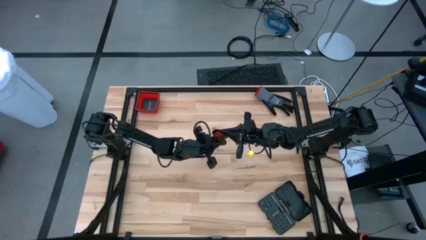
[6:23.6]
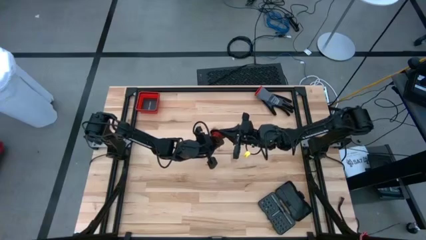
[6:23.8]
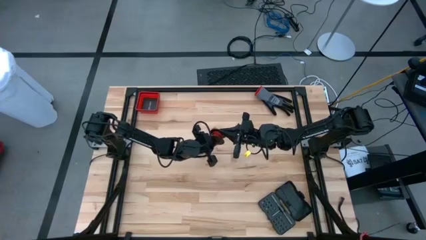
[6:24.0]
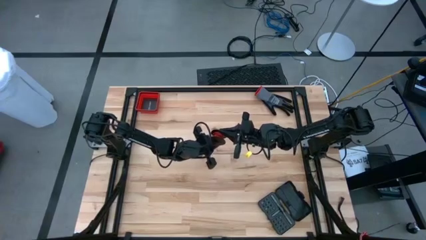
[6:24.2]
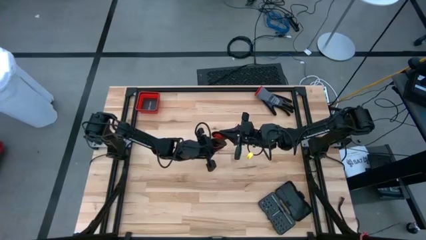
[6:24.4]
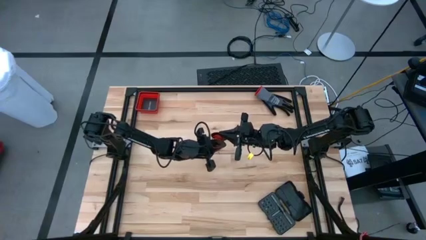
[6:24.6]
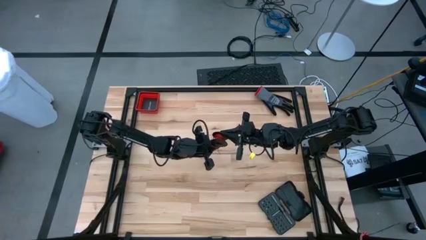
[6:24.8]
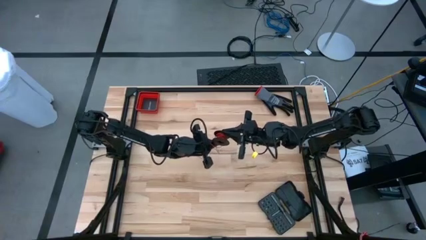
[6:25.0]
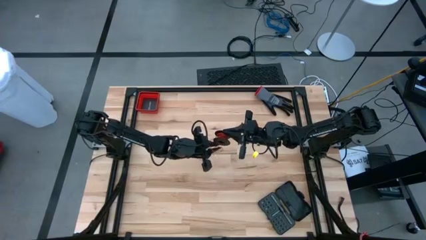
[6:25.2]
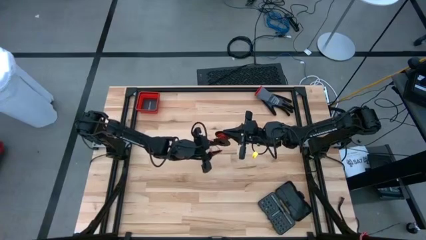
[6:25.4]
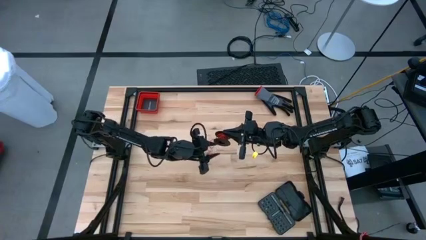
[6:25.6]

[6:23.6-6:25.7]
Task: Coil cords
Coil the red wire onto the spool

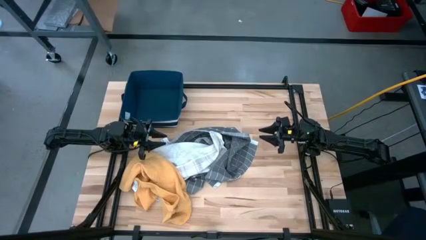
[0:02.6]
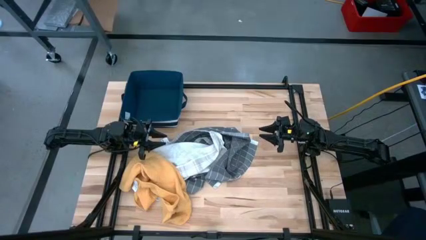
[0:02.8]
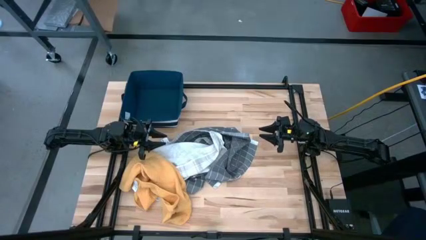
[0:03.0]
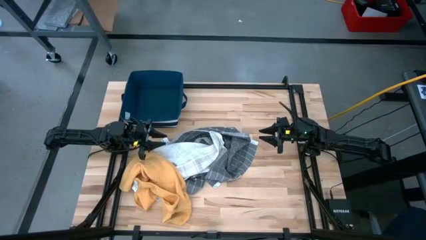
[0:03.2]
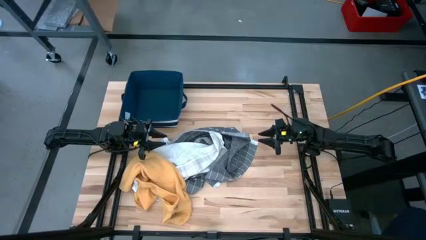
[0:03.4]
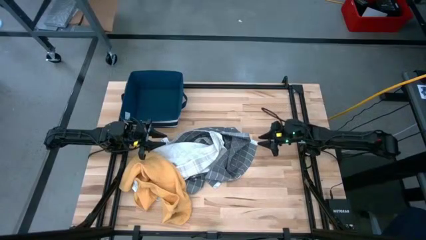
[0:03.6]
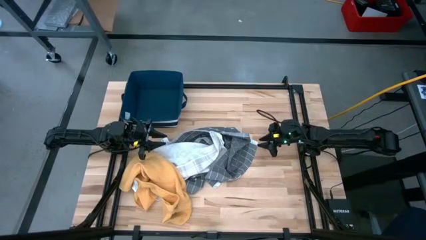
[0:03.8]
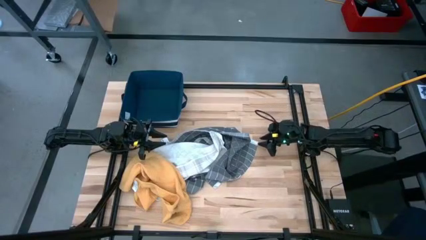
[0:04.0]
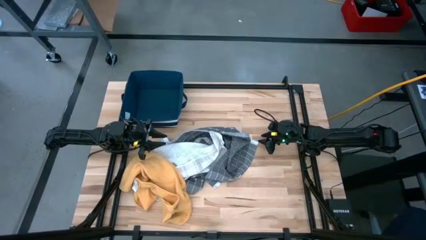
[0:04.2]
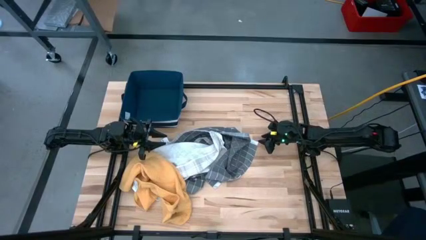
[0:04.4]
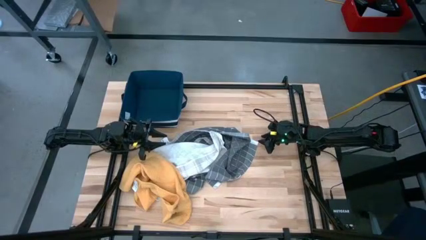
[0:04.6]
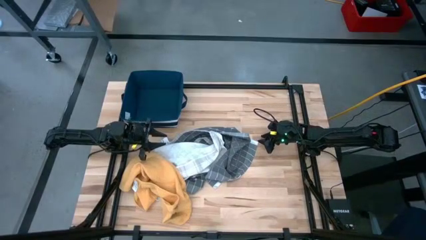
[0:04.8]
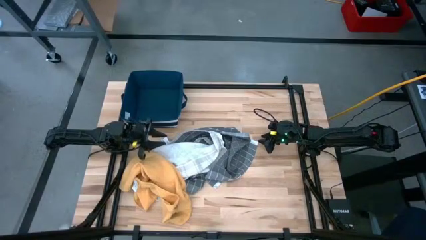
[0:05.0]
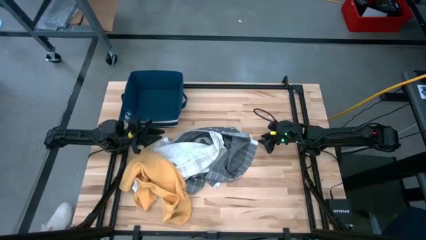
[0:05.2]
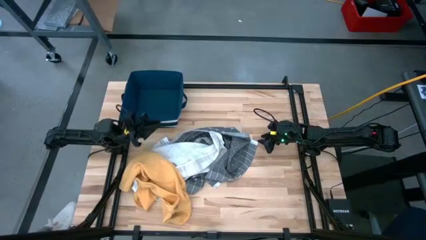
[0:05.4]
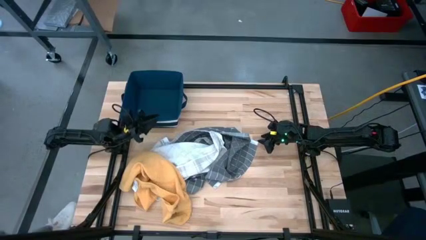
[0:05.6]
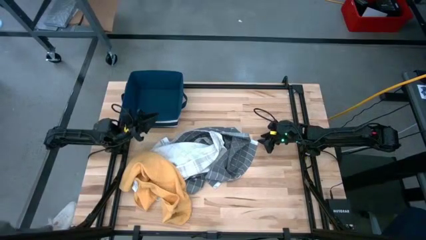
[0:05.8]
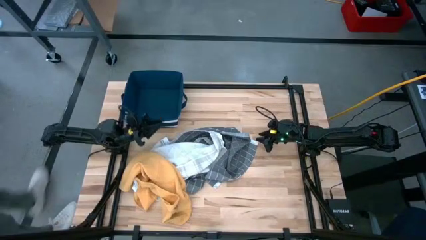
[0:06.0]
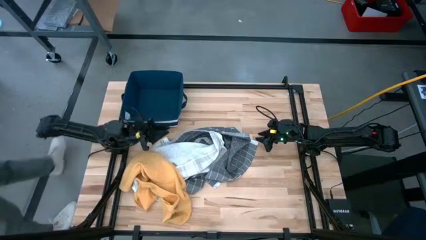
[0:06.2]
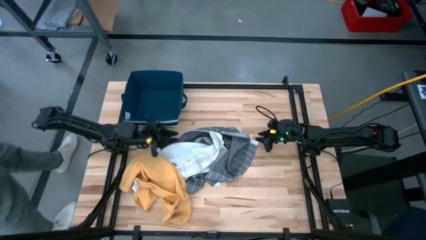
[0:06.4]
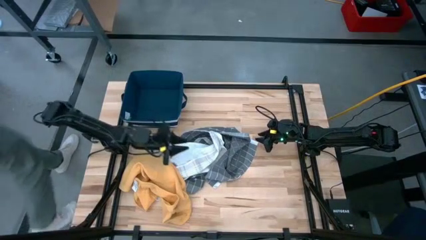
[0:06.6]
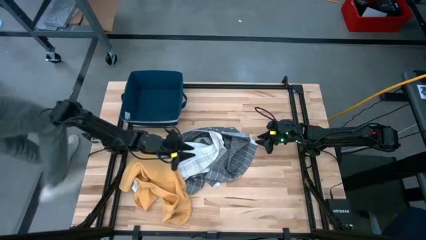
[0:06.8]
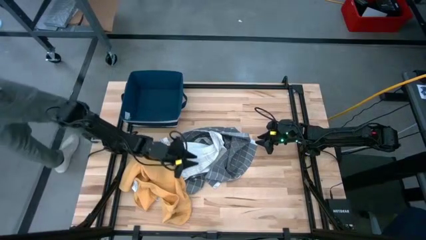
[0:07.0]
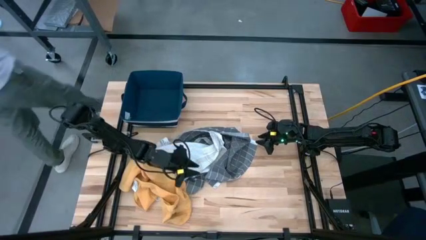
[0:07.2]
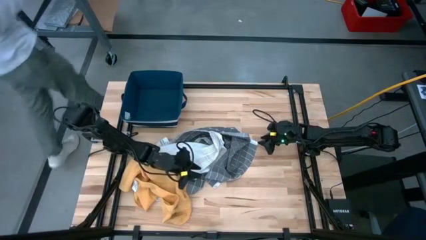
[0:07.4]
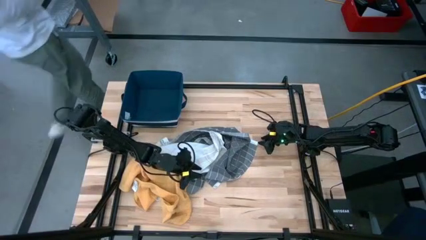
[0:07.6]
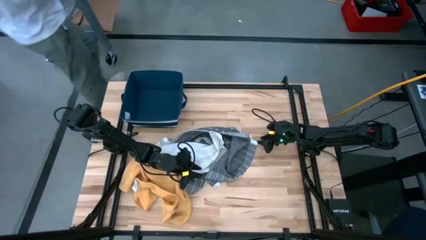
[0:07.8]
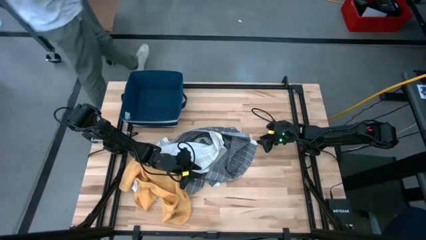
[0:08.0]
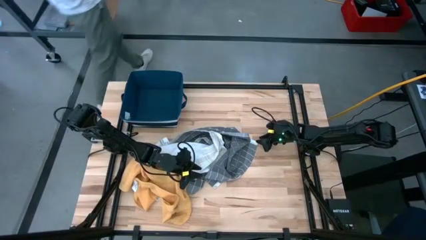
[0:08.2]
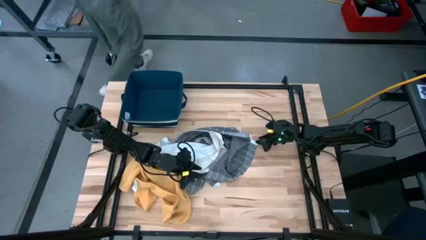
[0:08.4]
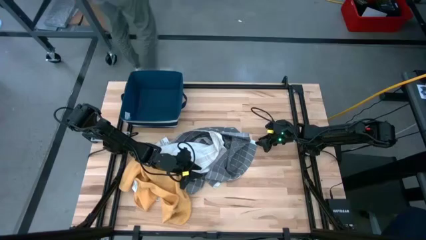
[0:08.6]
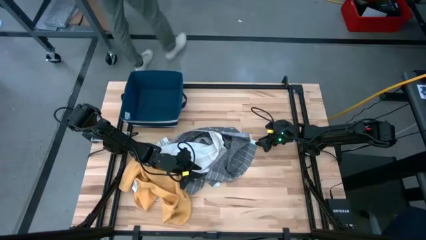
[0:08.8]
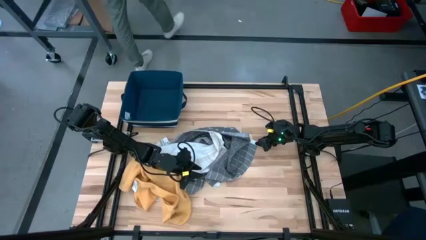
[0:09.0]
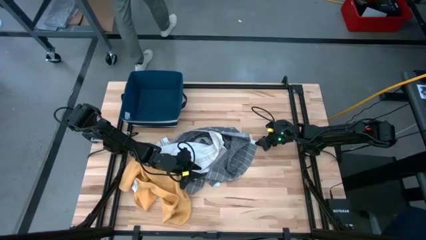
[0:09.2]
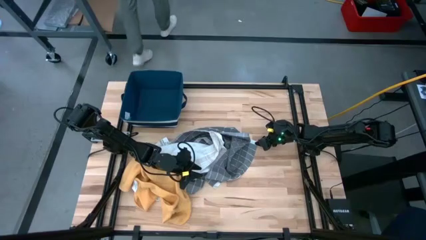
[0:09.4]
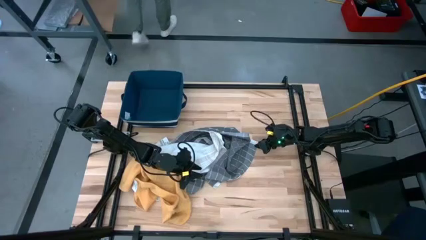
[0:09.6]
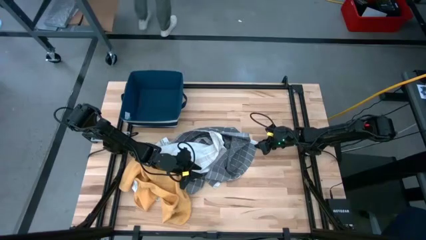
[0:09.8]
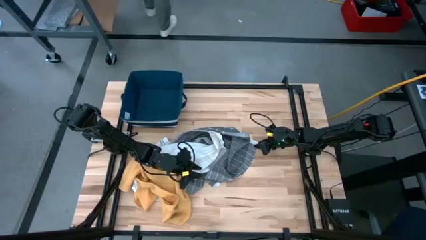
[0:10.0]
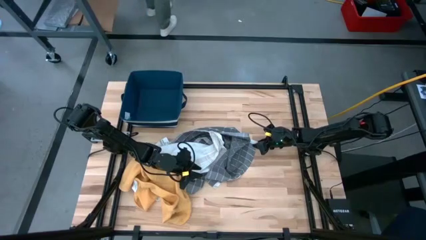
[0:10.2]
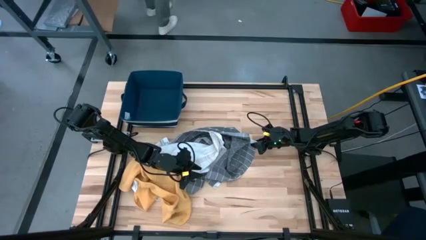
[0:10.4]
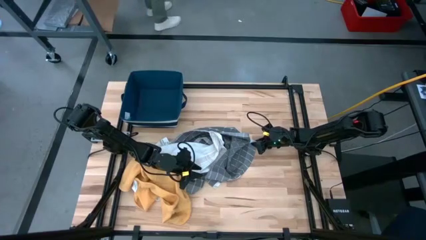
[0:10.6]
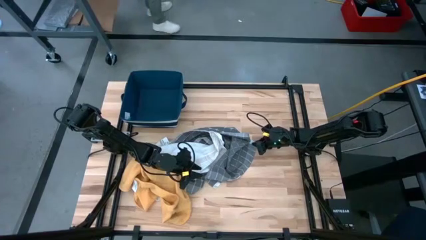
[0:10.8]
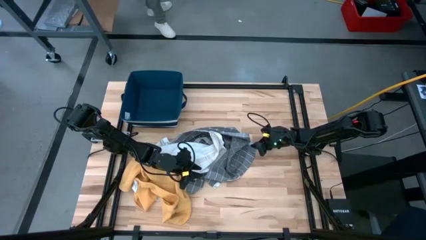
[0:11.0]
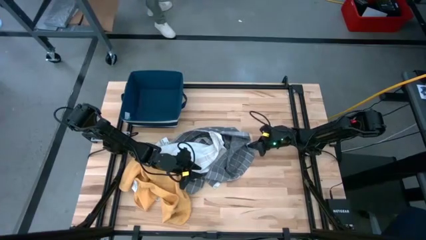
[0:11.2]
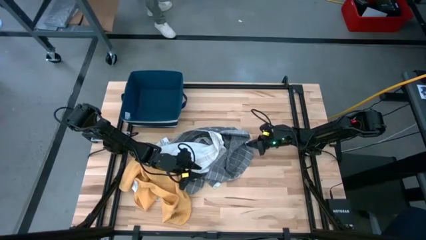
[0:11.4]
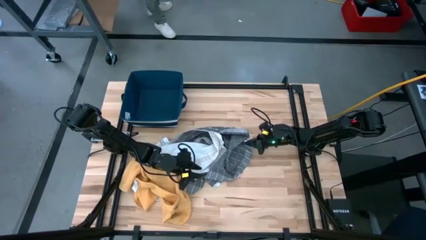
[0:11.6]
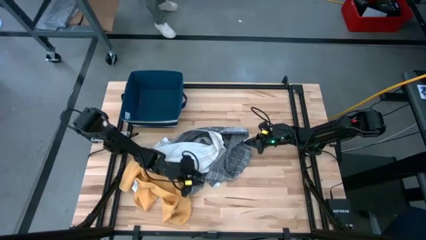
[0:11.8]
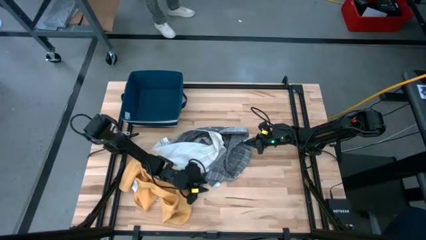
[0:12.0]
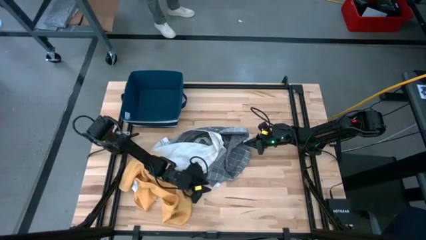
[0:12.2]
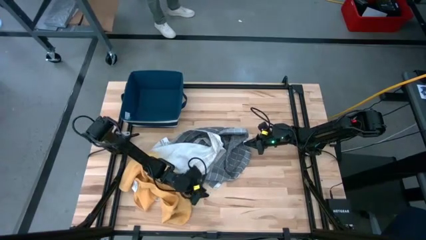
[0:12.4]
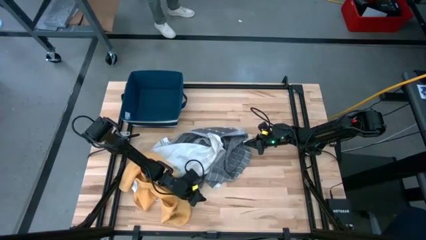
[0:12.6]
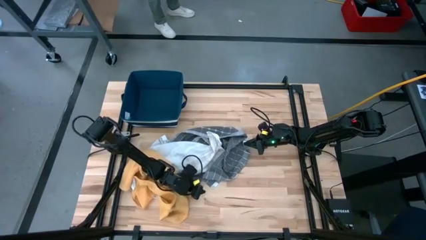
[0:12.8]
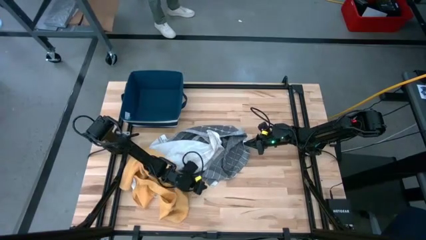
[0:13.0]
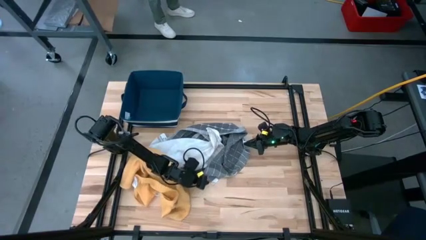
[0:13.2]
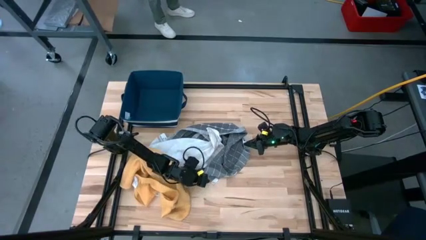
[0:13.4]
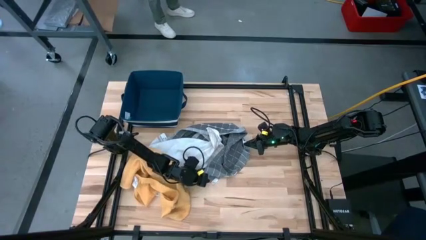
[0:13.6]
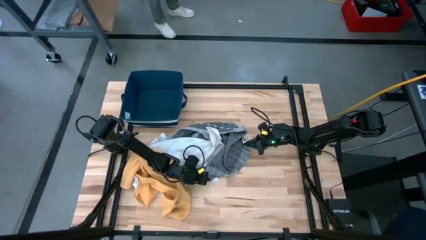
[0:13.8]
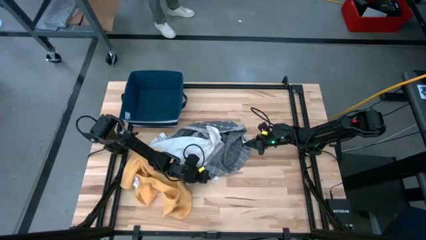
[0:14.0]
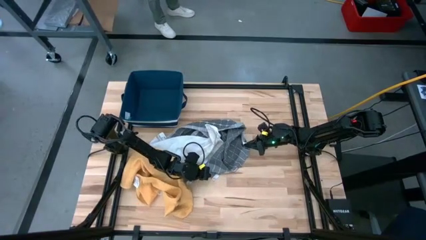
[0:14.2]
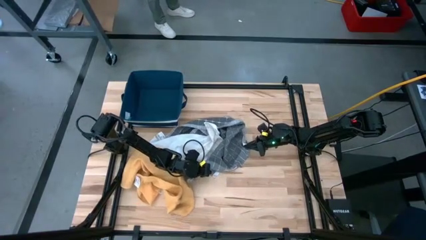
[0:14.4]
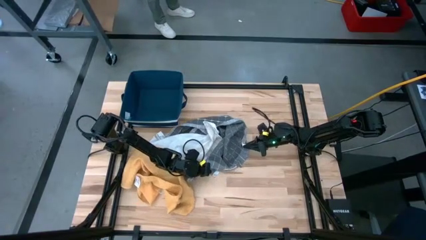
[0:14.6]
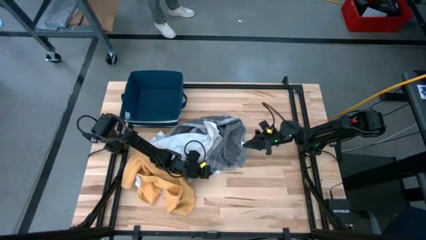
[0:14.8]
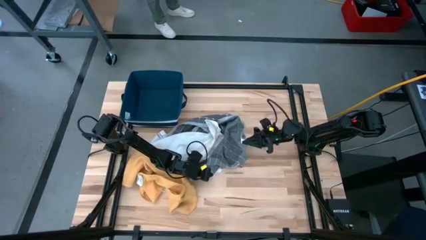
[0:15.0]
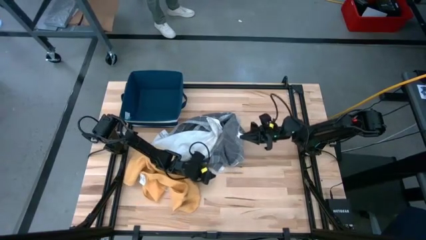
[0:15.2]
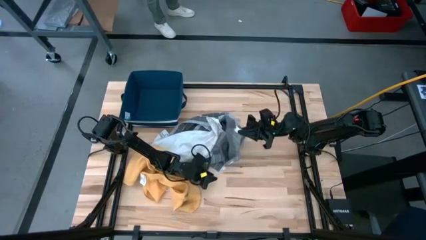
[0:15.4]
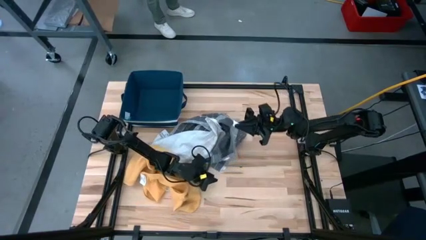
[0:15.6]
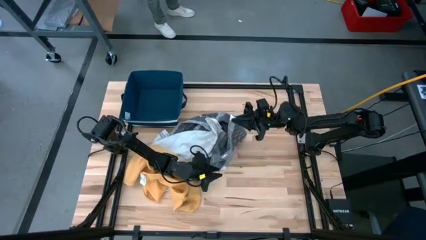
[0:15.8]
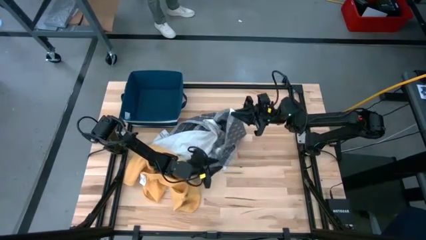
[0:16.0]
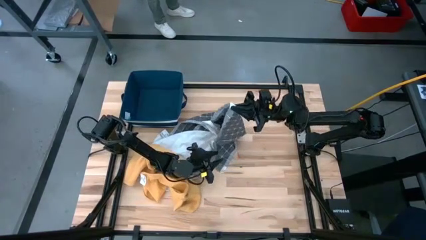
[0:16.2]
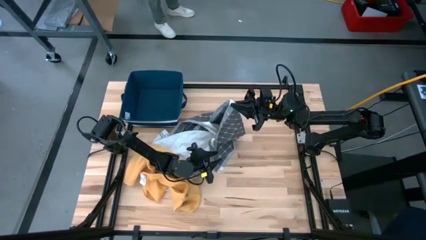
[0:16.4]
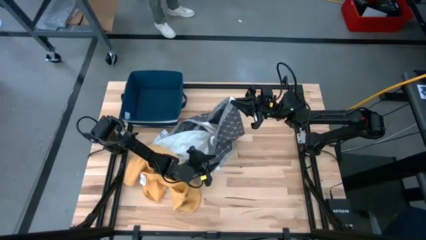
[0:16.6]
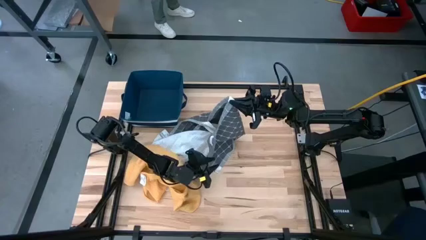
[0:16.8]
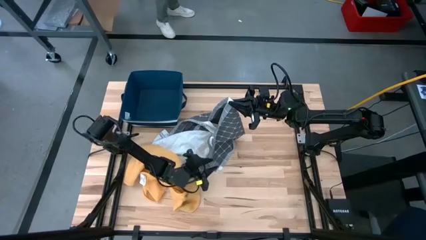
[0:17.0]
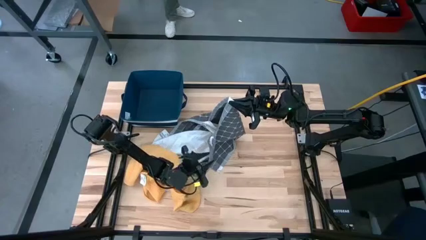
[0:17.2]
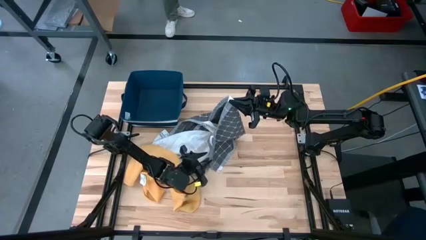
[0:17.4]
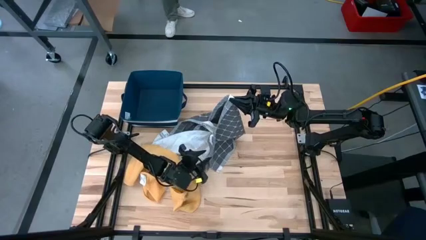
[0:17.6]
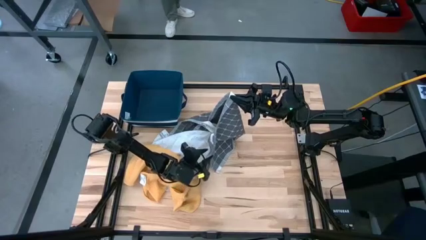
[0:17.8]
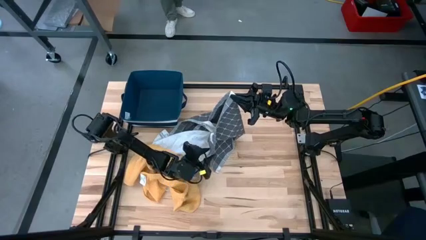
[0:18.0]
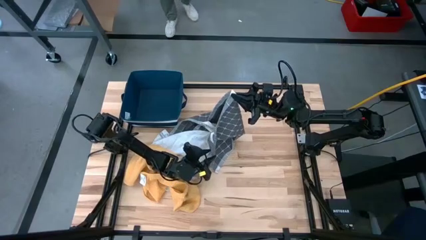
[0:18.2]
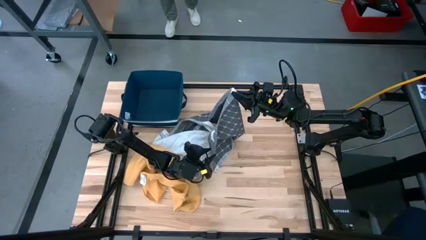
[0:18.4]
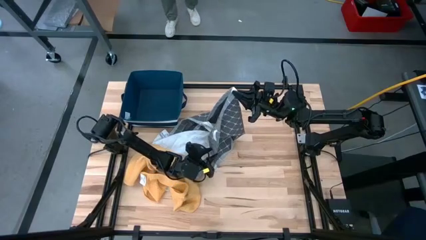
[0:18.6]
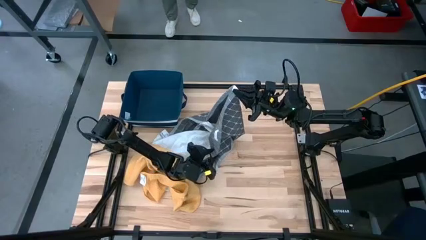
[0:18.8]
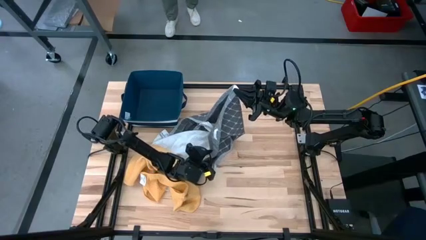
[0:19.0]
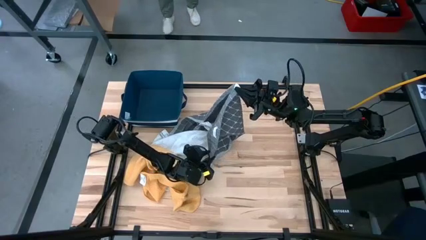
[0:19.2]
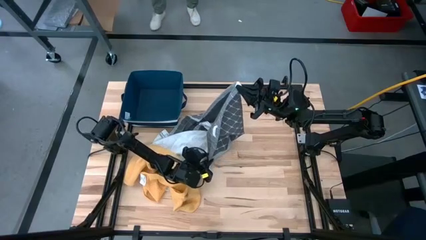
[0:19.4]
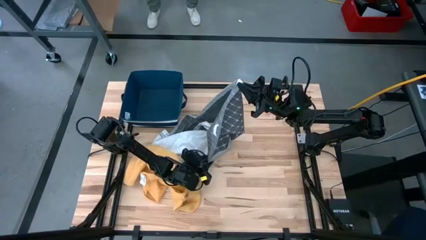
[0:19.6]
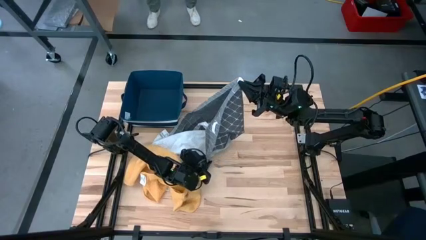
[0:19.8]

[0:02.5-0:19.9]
Task: Fold towel
Fold the gray towel
